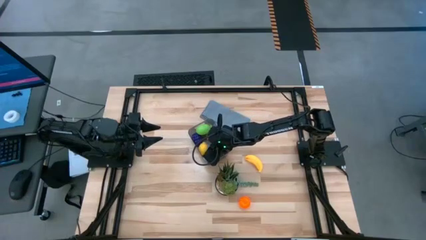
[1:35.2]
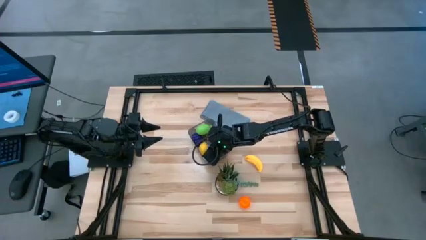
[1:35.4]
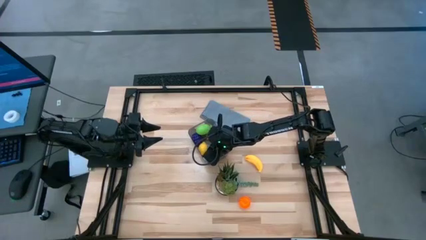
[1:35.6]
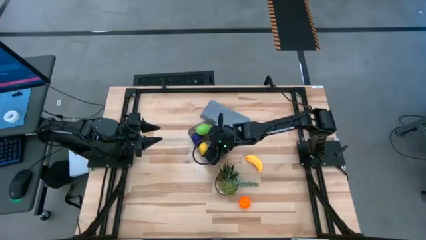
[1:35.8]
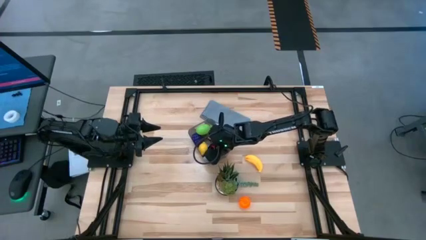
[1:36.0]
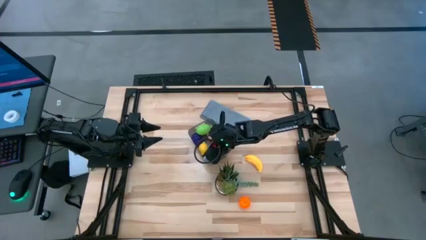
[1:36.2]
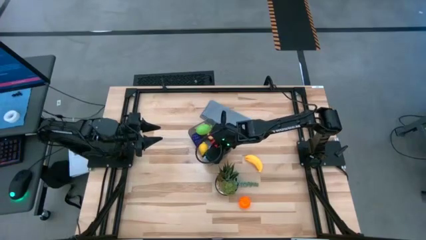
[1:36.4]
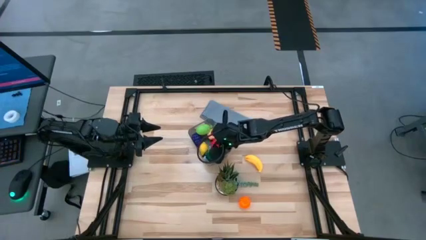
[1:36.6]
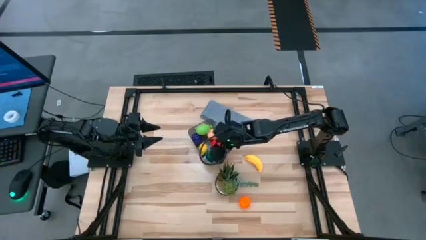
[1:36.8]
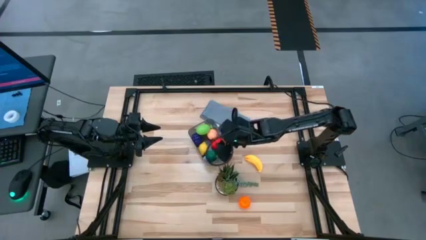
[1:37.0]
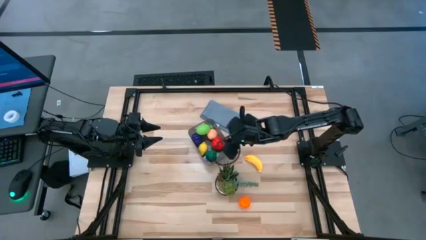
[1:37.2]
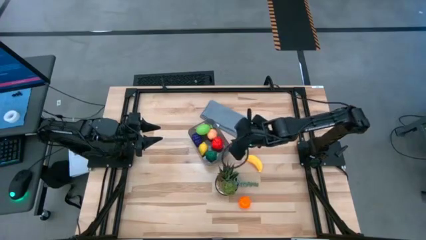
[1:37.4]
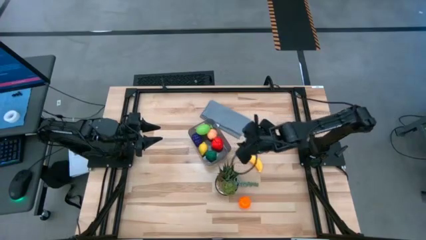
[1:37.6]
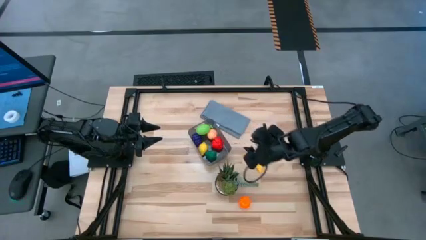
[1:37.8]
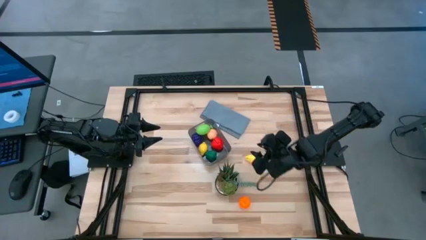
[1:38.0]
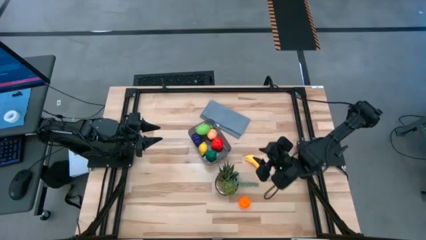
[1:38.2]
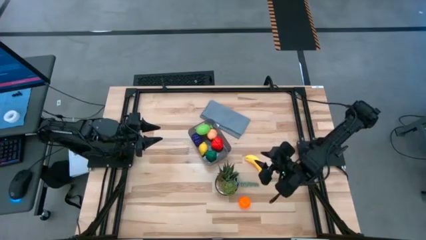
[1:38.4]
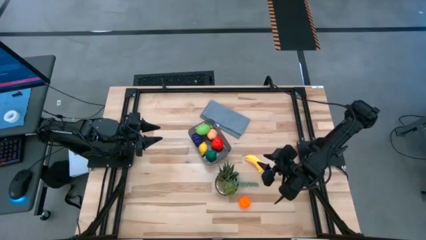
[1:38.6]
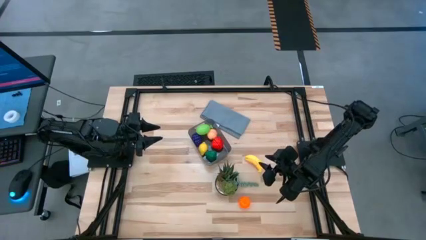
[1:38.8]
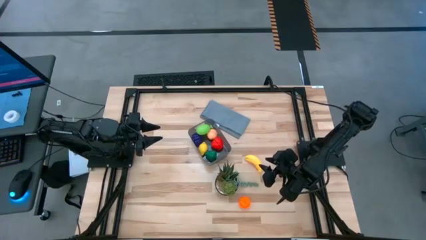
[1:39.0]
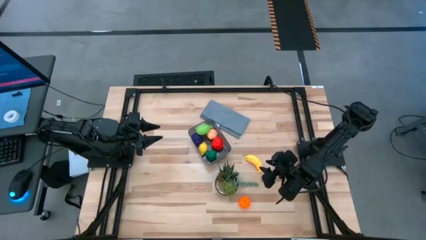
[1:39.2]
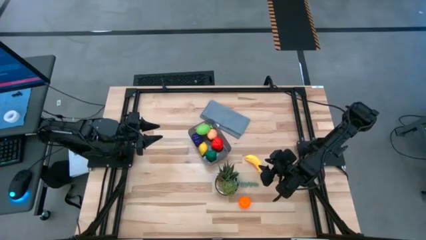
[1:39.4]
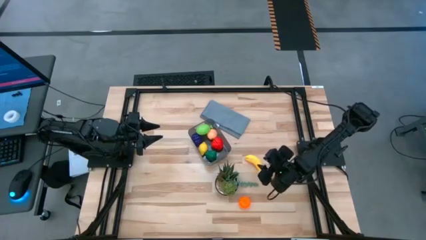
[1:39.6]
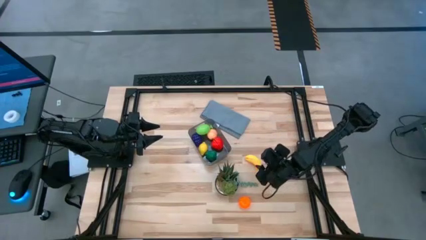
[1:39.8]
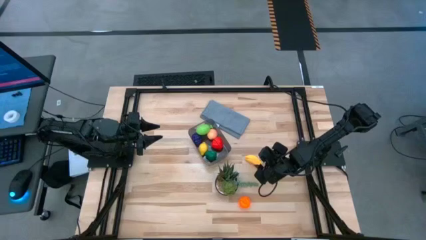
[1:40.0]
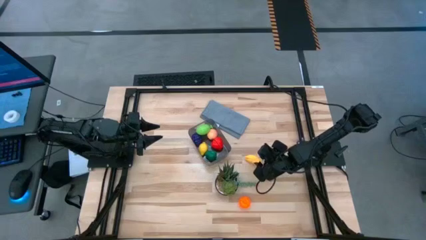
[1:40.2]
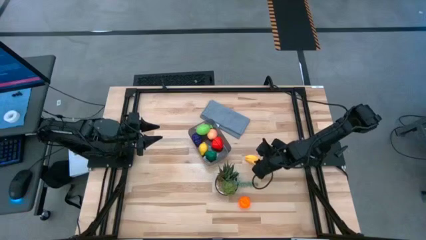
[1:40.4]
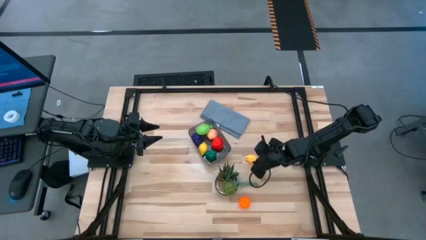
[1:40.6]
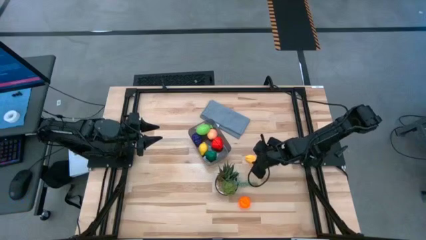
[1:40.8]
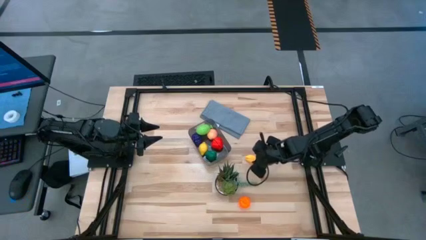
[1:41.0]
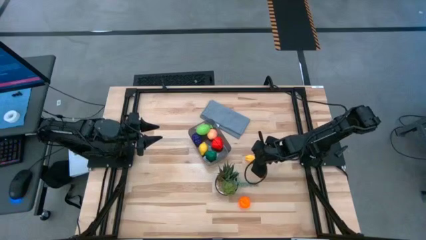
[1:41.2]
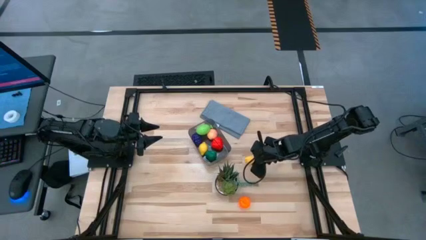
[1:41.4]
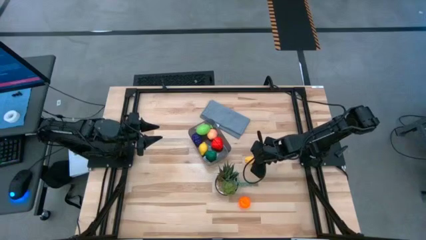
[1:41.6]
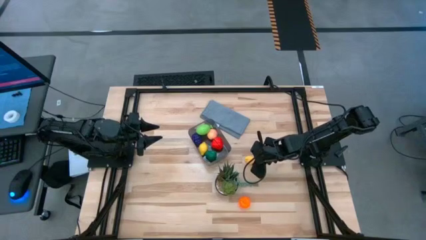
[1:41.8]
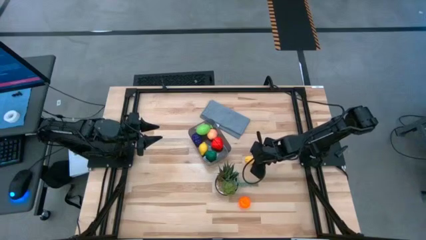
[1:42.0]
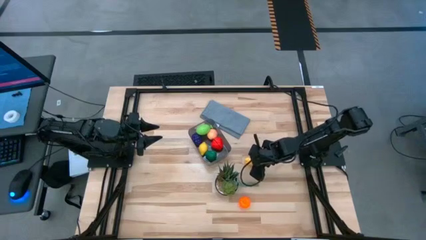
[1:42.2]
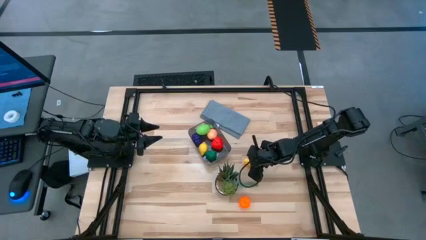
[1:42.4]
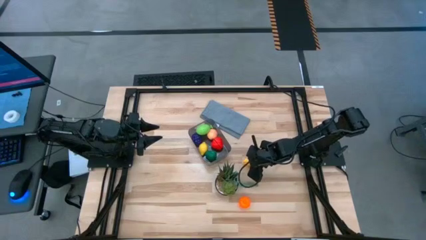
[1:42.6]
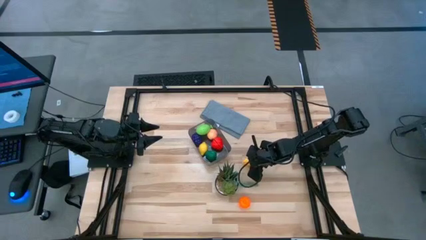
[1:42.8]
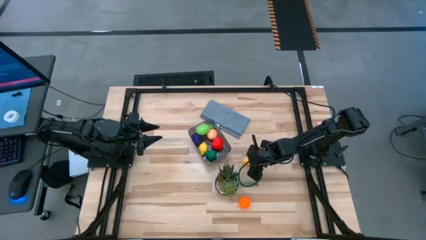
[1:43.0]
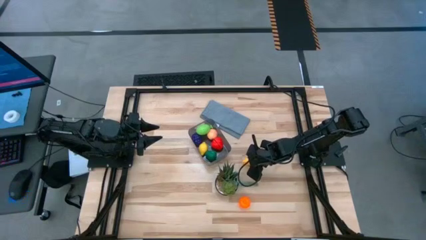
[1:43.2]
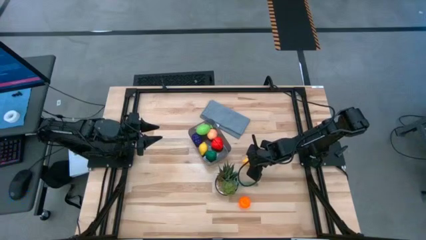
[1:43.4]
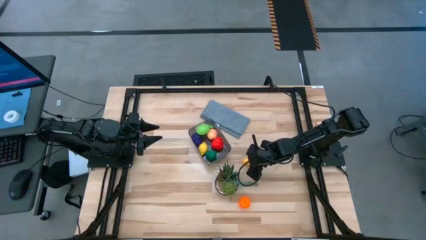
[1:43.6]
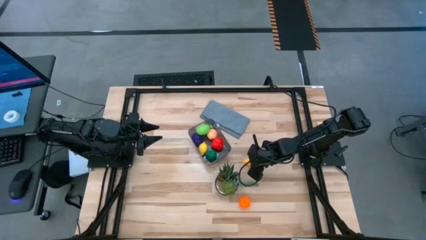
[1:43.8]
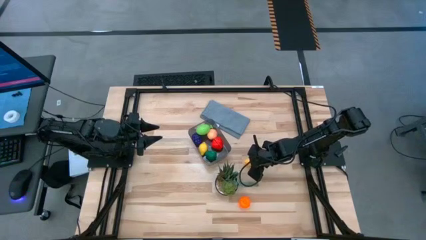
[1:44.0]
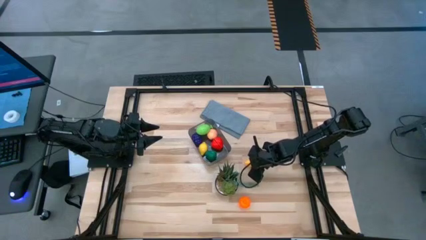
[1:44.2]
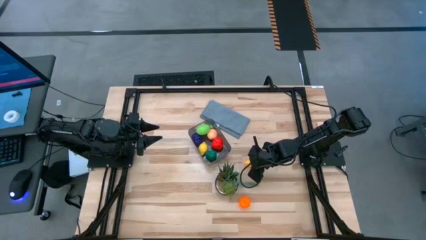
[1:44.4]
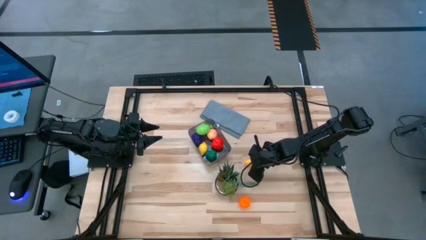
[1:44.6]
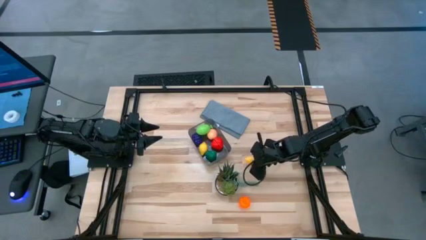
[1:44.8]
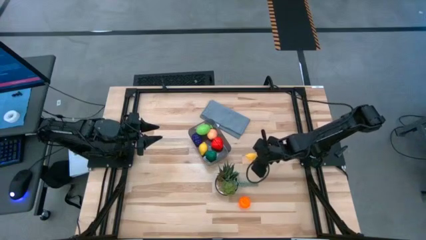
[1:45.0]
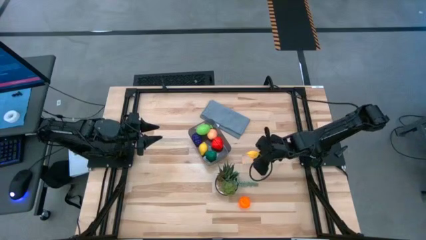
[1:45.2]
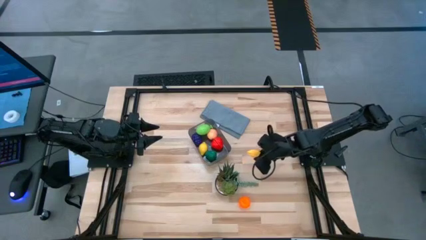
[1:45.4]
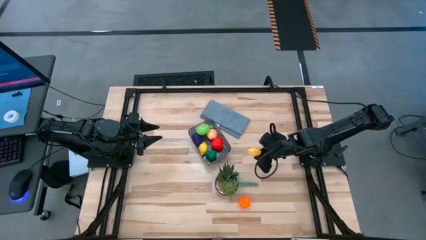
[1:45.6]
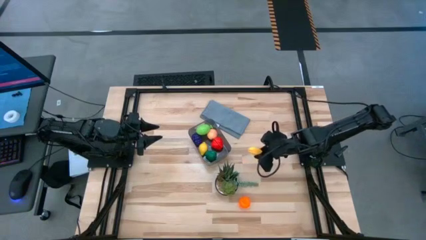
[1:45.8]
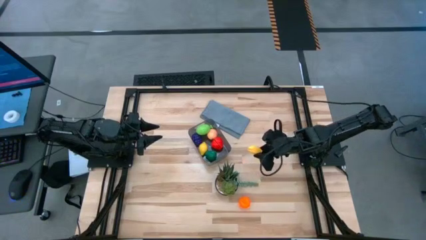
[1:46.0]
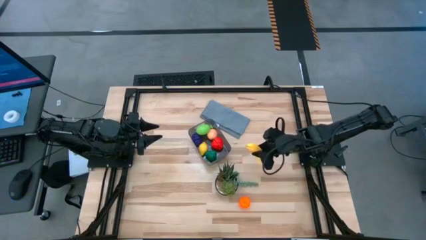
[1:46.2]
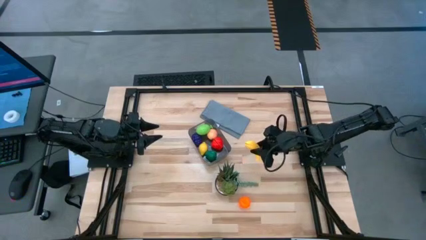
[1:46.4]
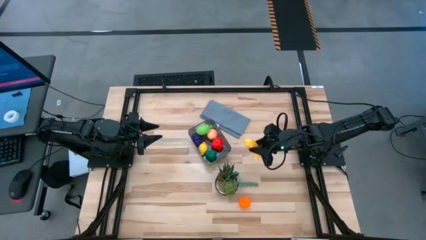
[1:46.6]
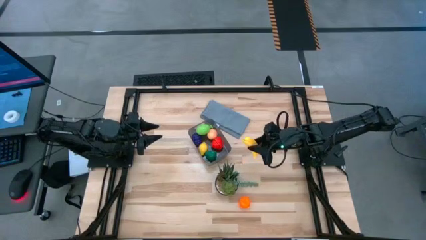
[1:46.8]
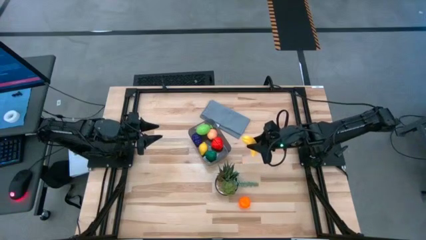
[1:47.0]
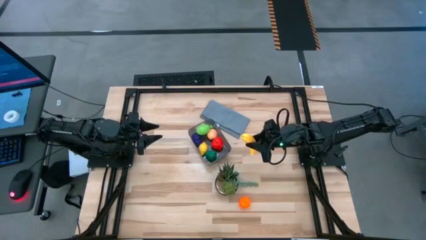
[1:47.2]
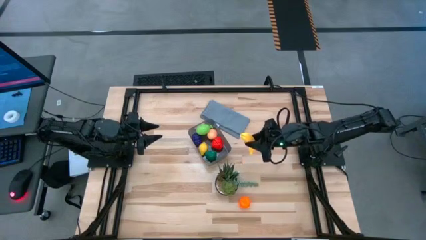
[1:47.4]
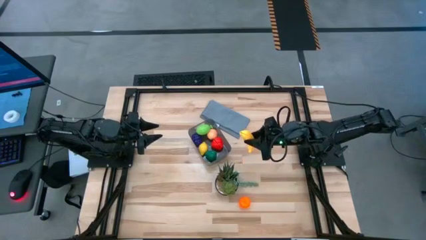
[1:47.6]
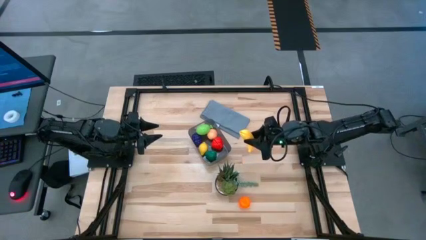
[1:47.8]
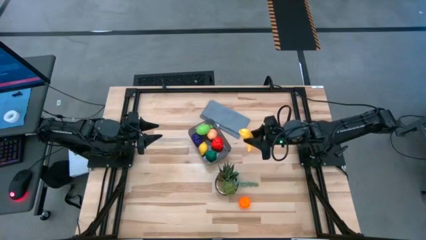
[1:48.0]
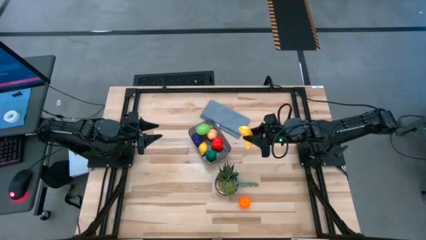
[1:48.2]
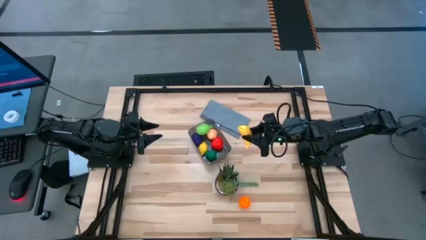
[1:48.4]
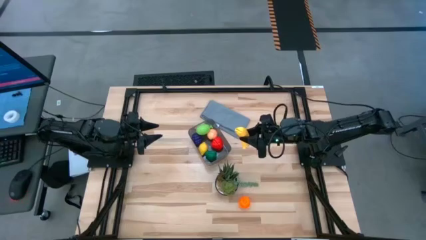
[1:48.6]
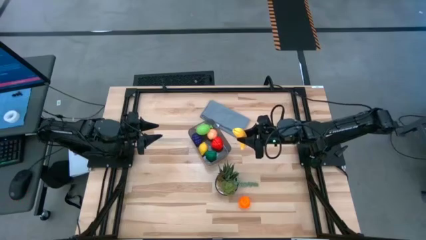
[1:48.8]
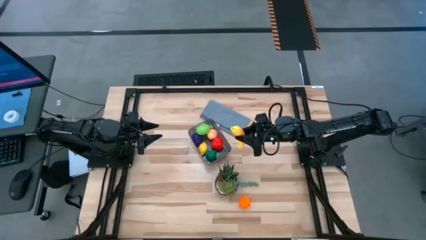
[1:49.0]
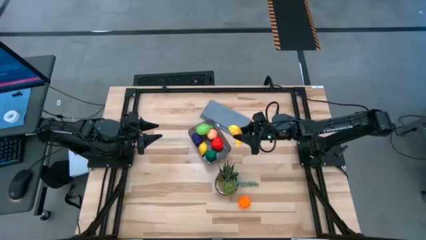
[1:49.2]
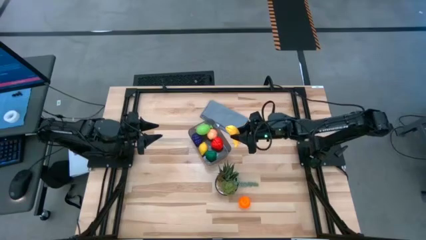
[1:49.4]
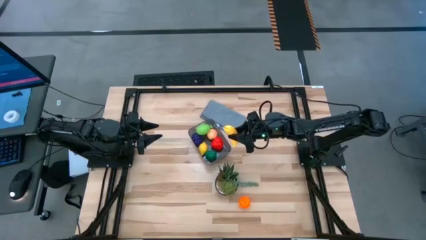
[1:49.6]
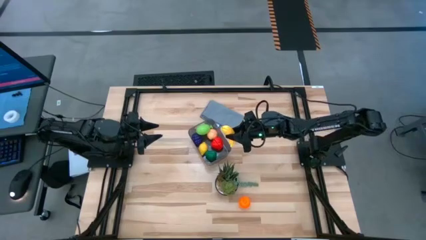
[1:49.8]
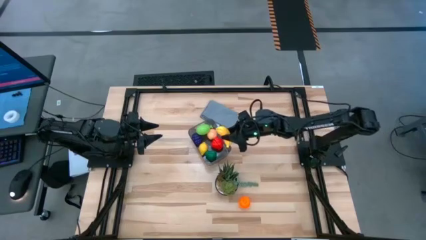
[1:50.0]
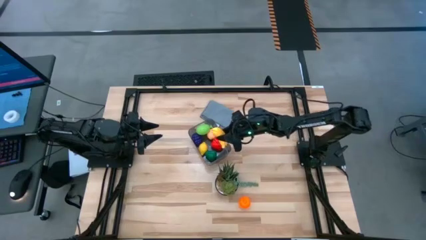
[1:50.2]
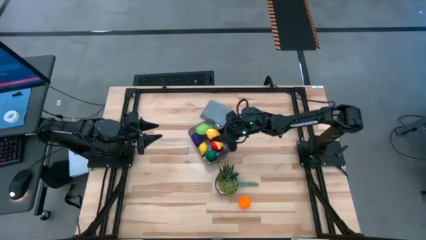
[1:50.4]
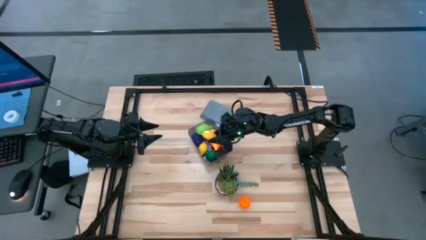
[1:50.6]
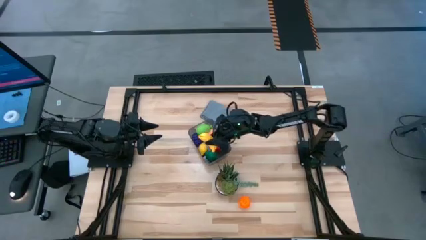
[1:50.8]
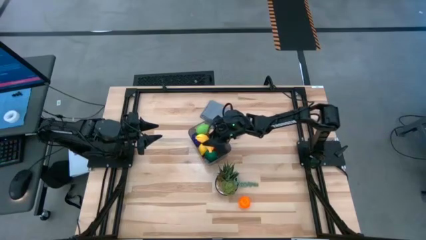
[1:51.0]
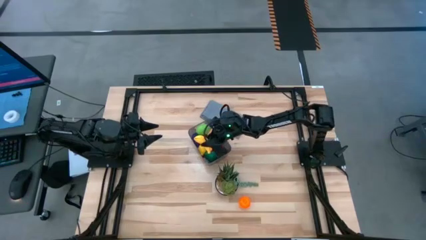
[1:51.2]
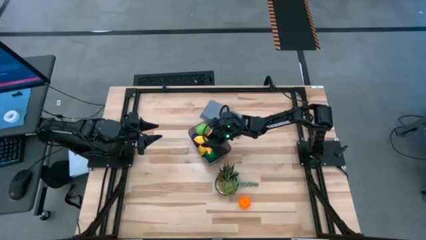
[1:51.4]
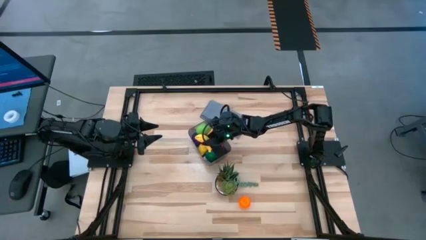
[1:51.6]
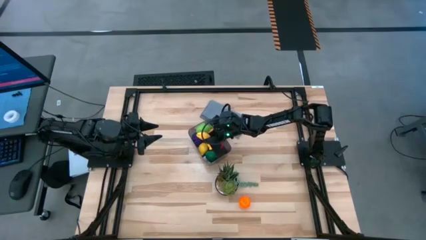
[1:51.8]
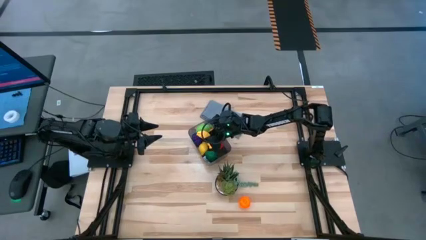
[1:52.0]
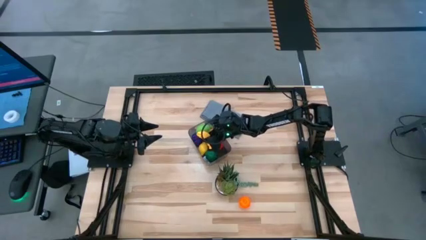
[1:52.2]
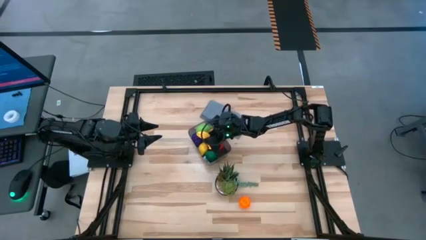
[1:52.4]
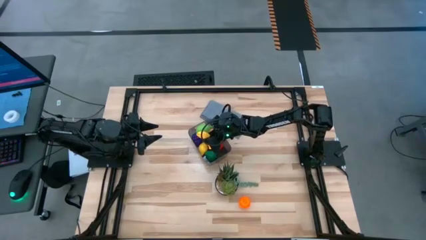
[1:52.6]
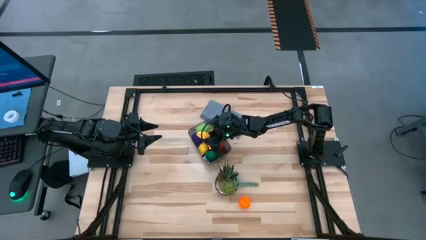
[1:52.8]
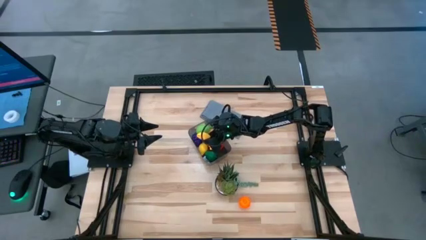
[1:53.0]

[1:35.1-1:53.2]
Task: Pick and placing Produce into tupperware
Put the yellow banana into the black bin
